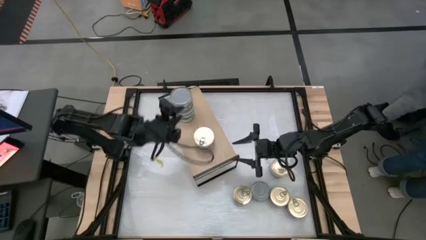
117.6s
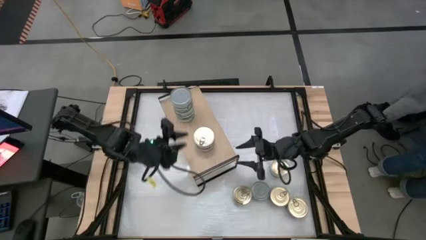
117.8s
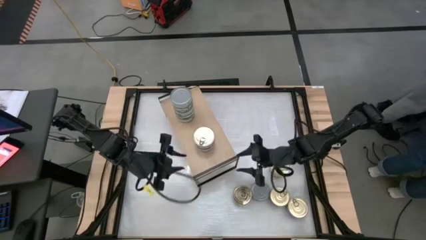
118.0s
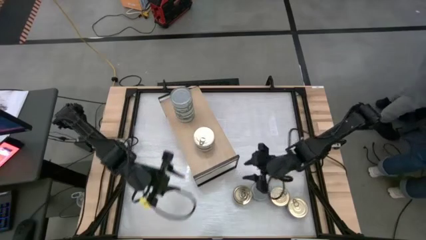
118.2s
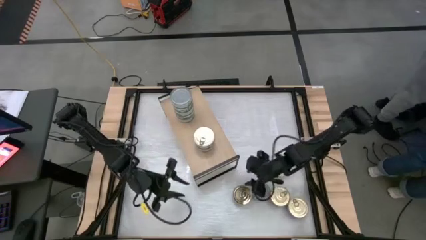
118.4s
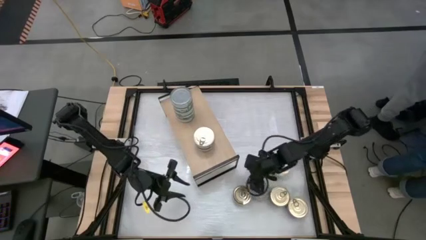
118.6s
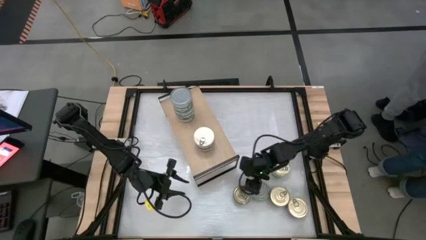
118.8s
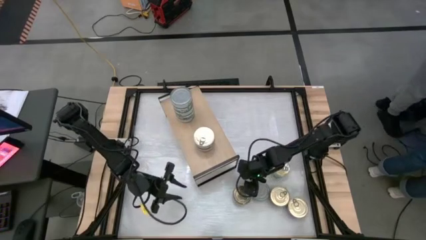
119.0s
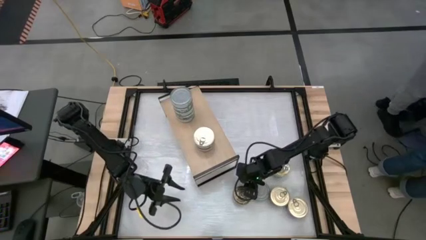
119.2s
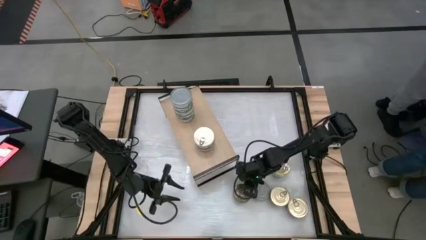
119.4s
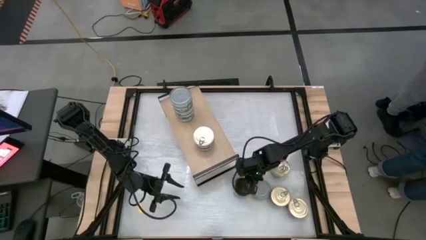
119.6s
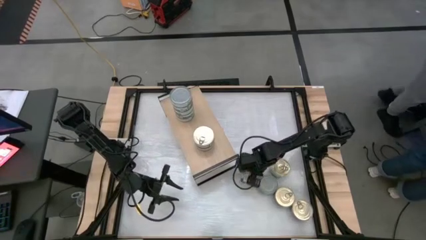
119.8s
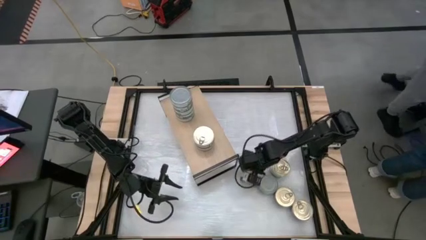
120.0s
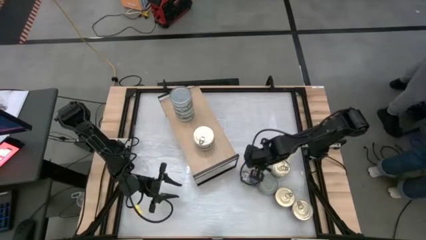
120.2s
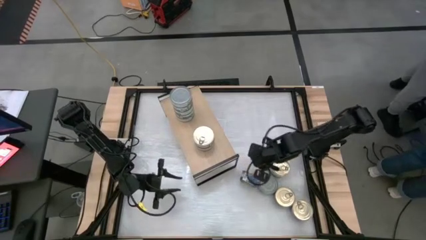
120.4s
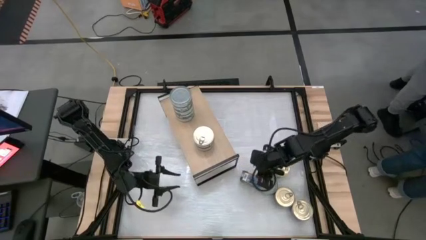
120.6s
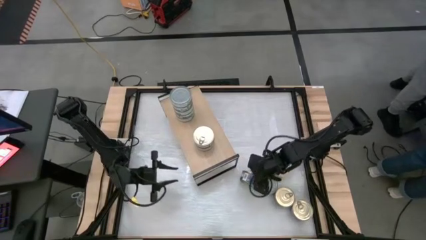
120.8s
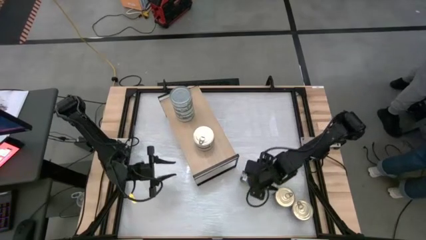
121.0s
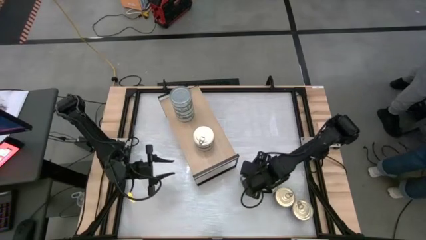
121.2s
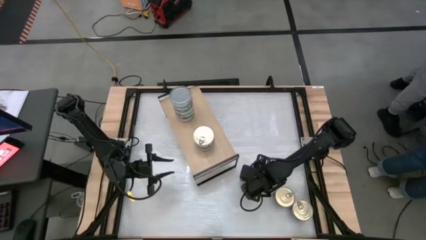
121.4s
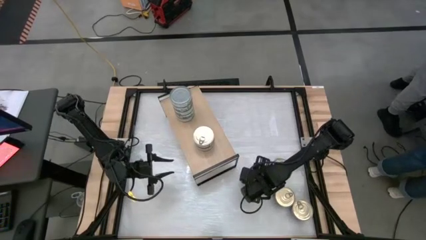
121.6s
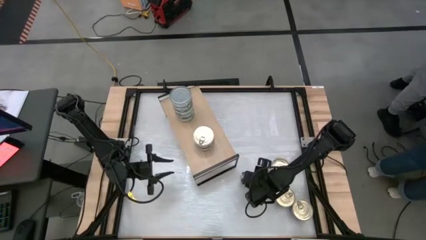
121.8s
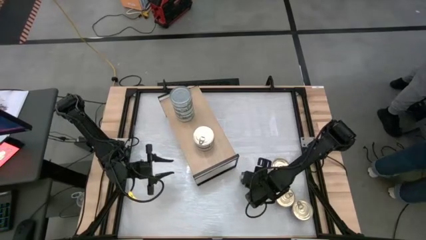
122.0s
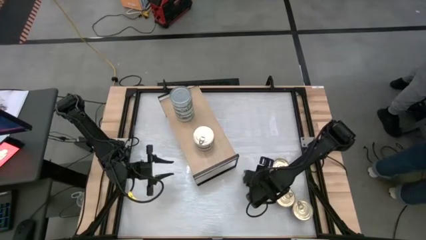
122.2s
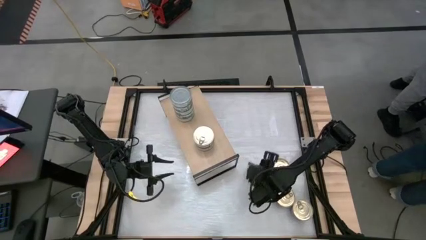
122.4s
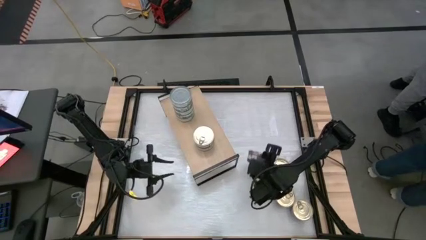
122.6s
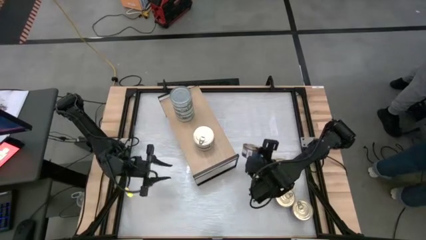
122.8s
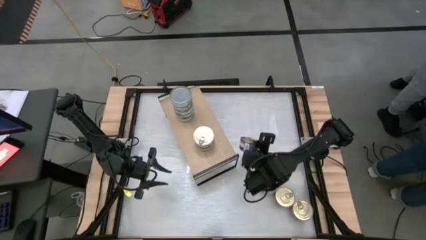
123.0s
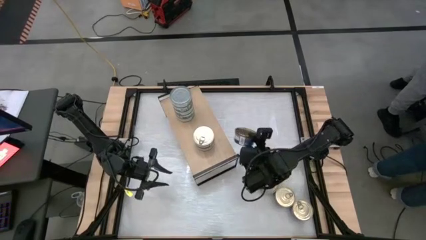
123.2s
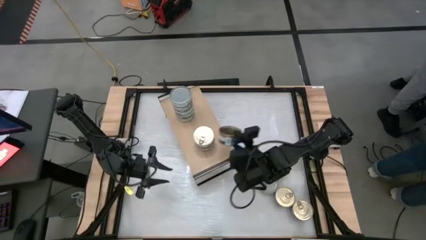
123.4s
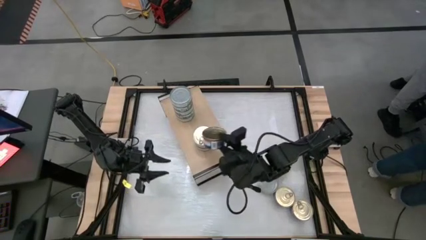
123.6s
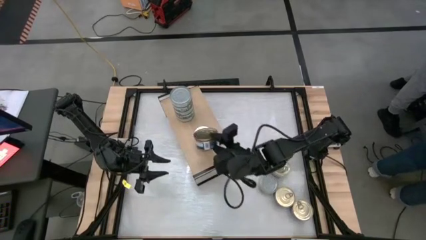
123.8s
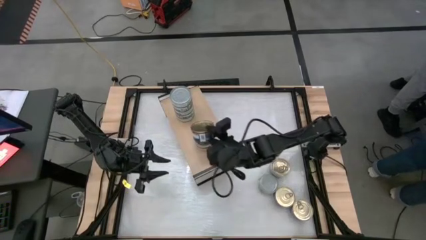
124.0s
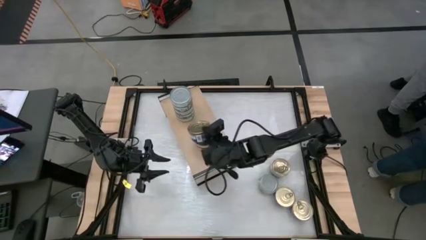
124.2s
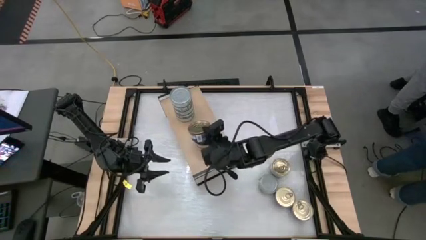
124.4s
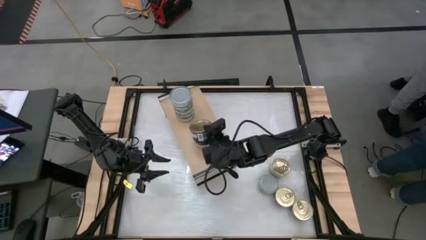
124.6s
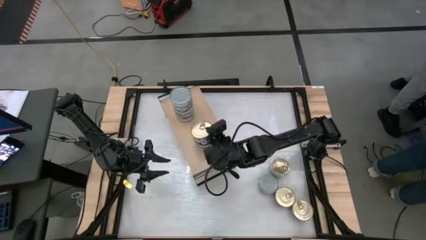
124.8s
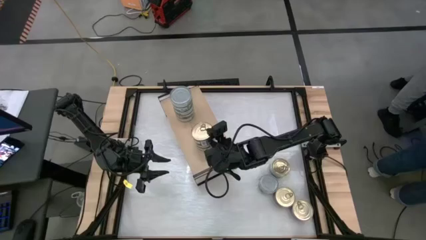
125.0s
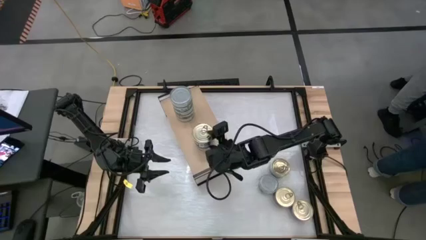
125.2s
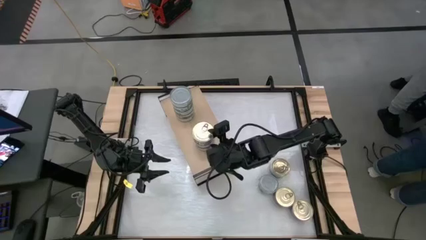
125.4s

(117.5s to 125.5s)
Task: Stack canned seafood by type on shelf
Stack the blue tuna can on top of the other blue tuna can on the shelf

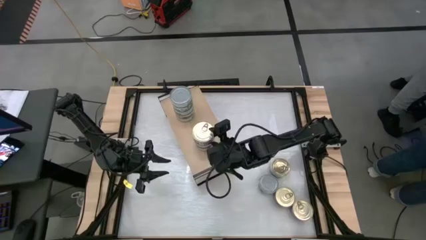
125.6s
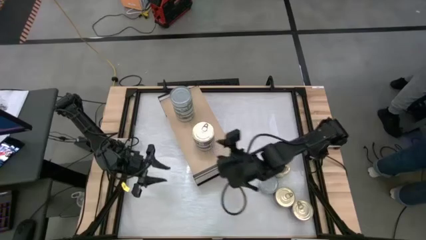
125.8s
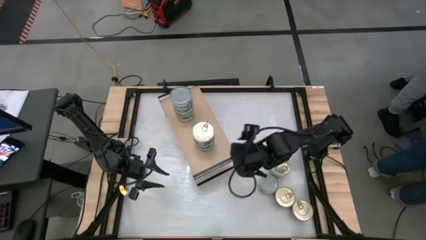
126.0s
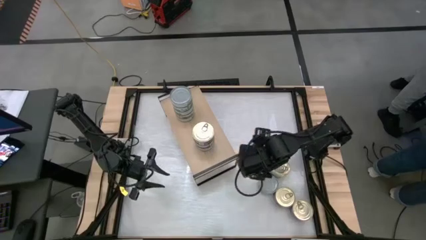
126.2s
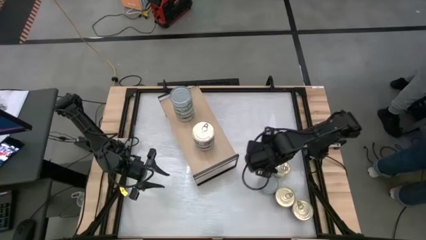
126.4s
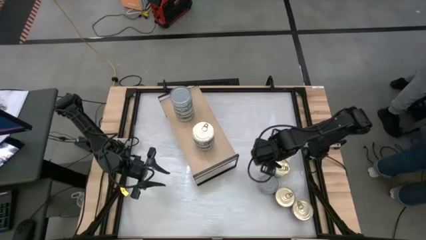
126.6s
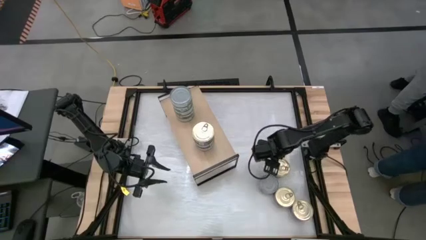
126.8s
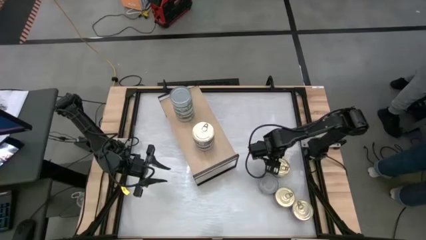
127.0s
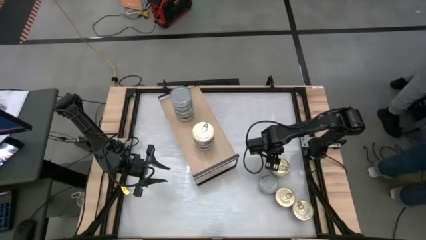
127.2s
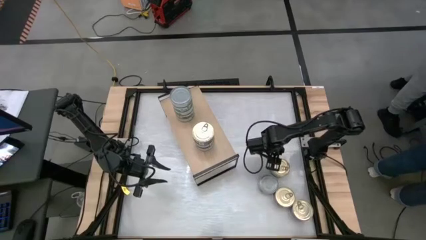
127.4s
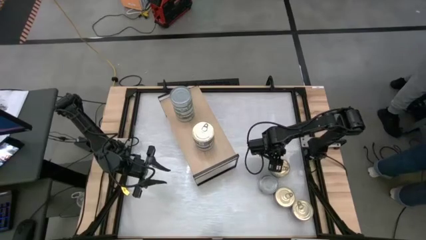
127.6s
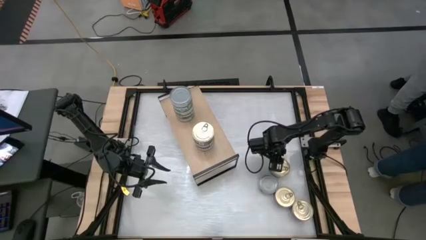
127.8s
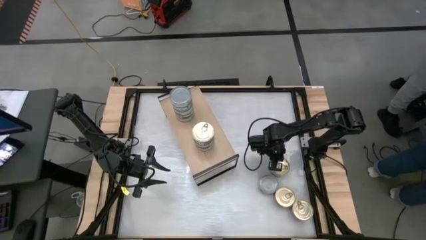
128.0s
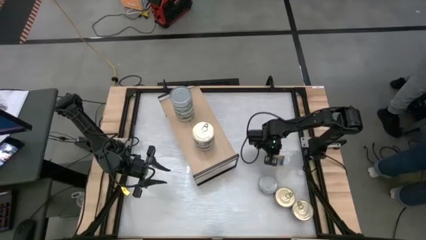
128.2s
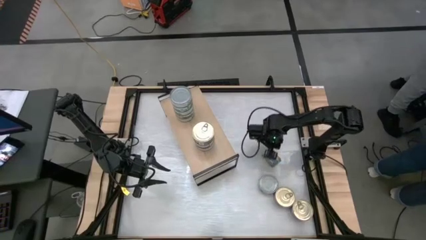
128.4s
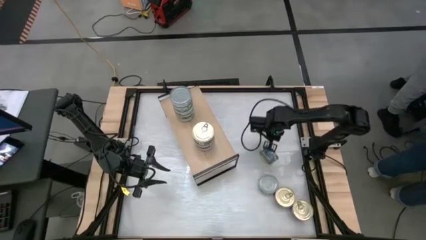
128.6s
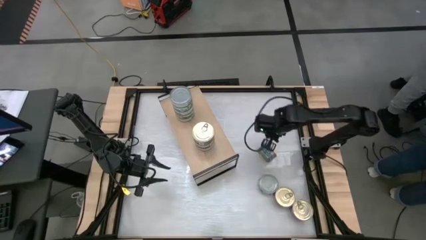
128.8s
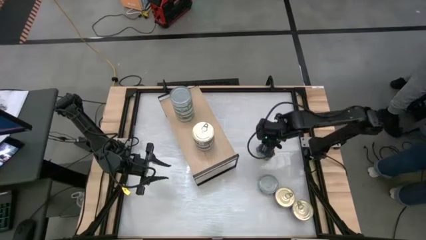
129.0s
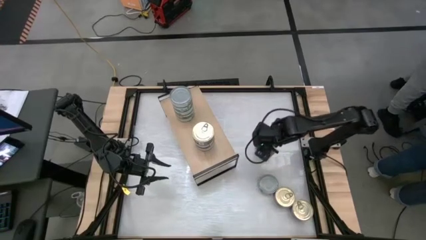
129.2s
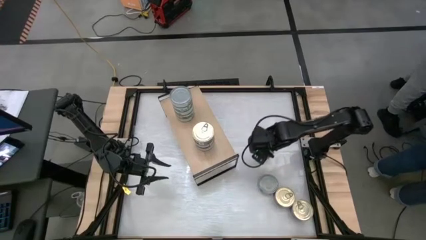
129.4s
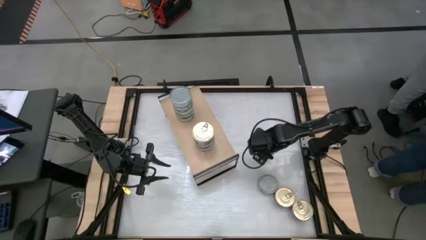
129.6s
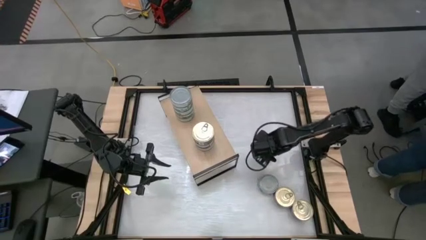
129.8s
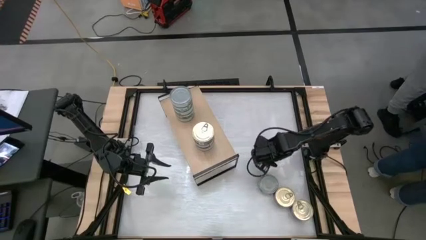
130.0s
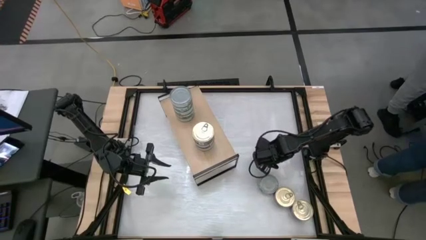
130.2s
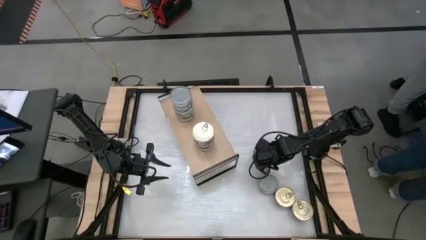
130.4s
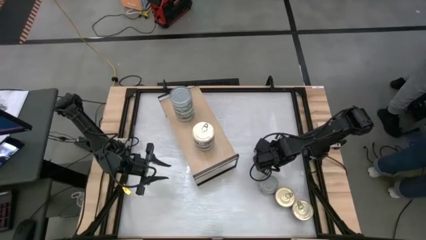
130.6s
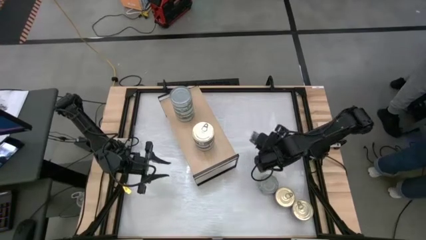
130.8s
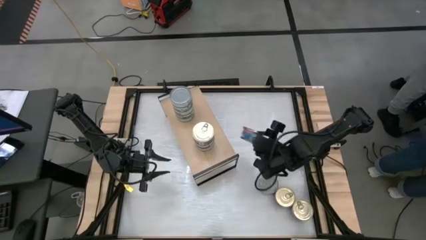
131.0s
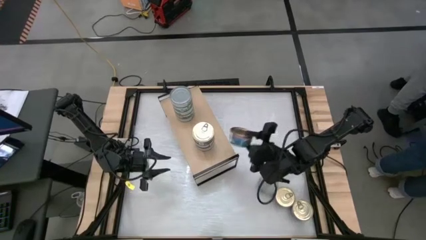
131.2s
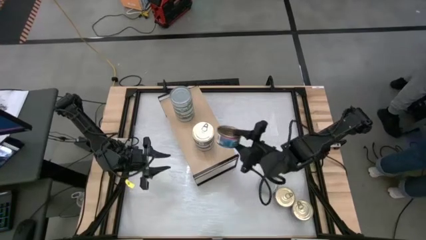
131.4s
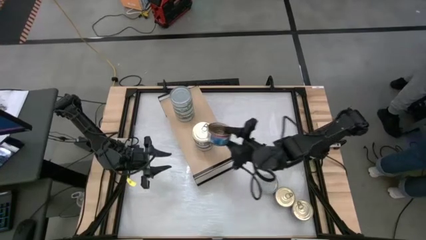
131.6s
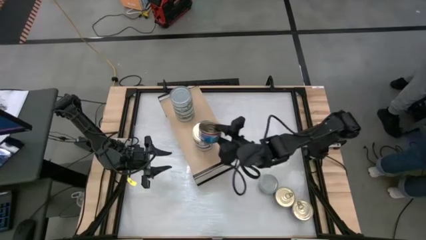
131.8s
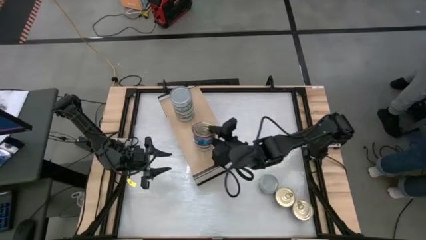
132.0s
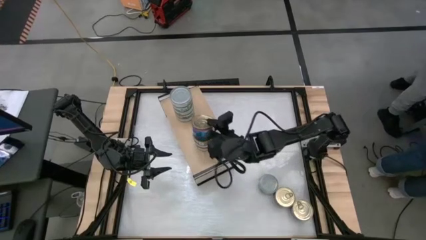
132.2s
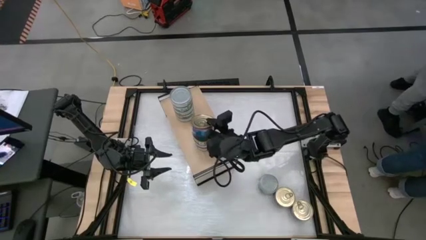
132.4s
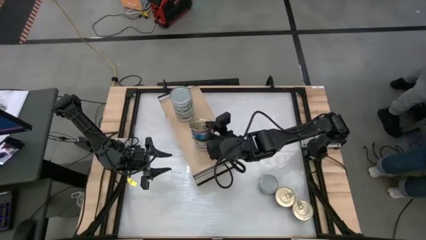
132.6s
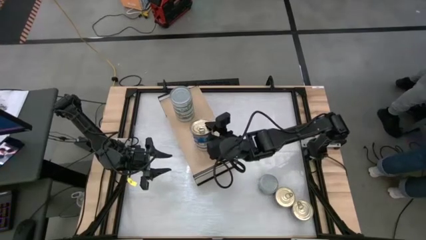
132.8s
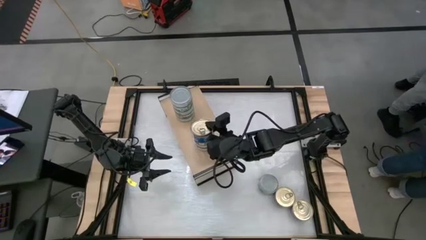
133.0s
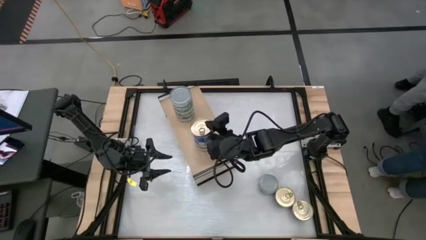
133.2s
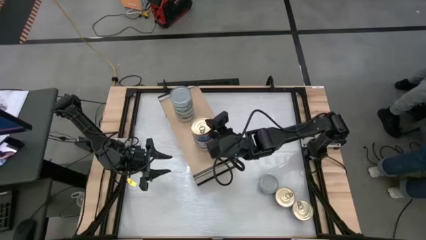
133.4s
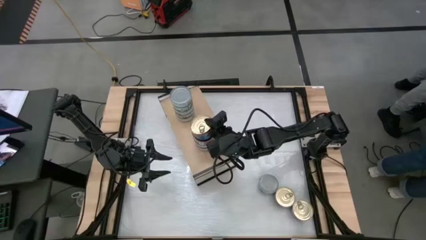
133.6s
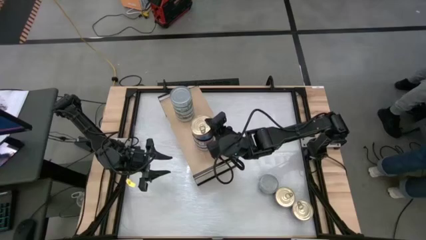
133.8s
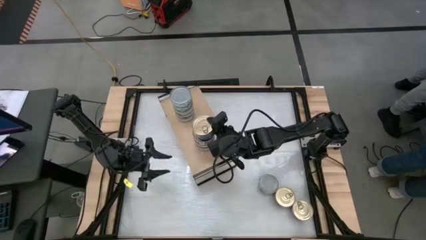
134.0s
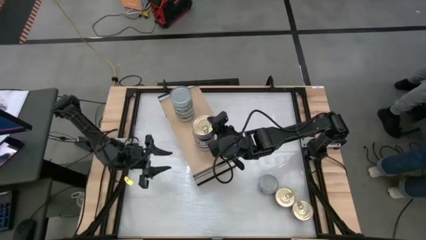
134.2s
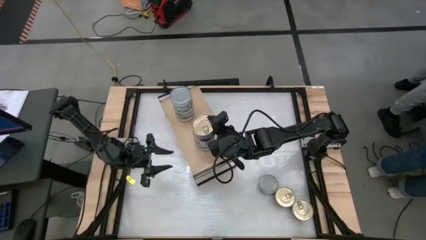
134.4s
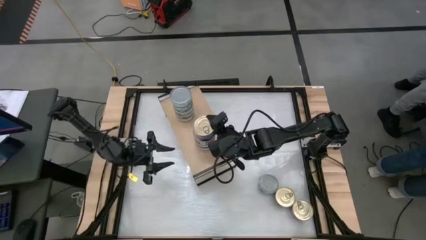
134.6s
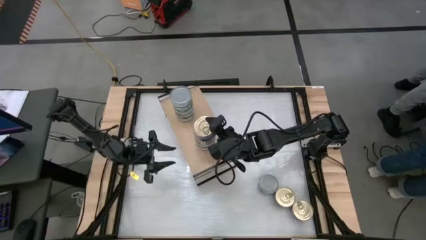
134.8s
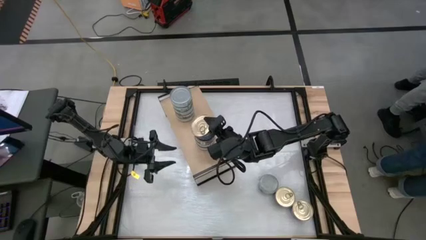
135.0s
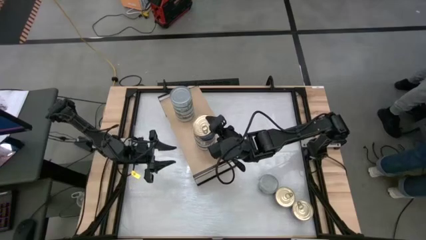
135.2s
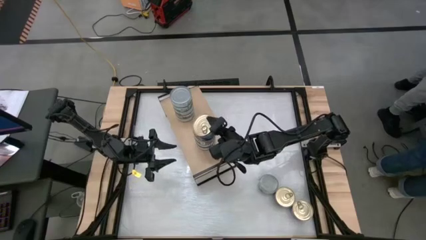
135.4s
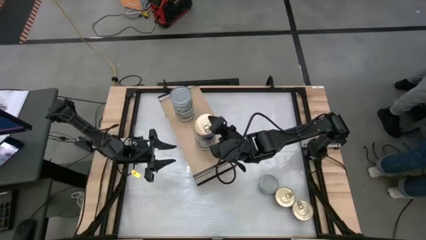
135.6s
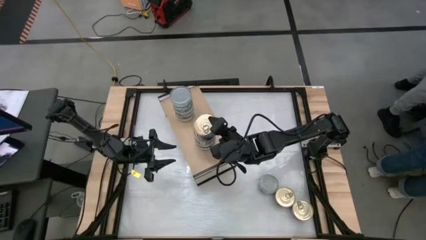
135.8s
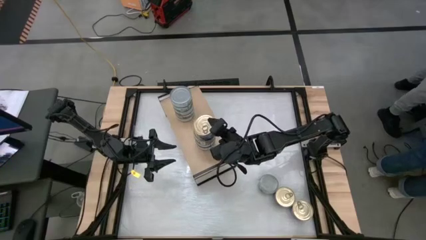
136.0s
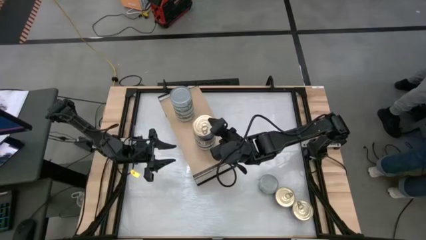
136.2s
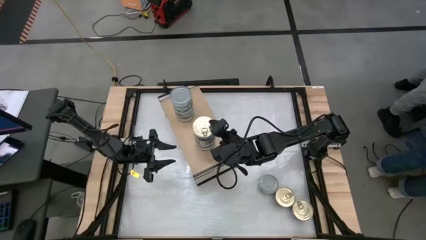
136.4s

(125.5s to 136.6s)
Stack the blue tuna can on top of the other blue tuna can on the shelf
